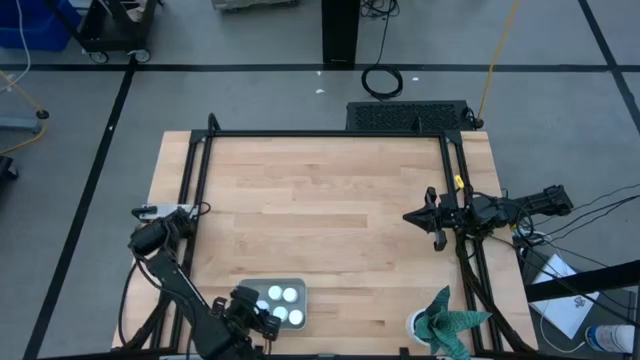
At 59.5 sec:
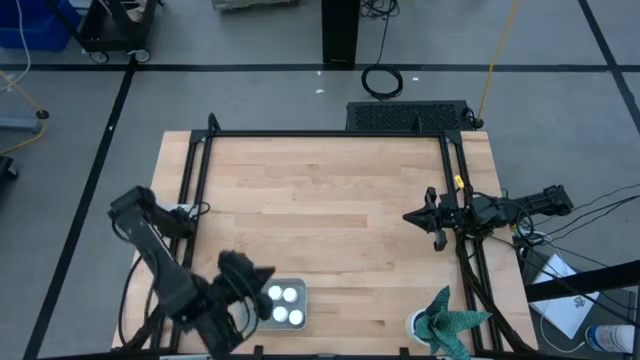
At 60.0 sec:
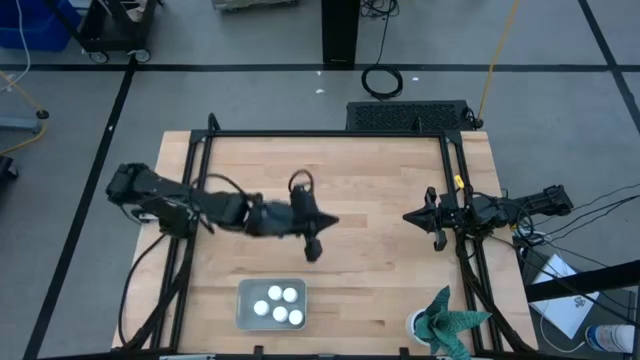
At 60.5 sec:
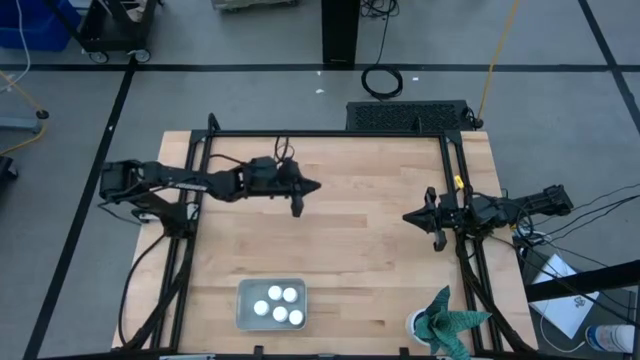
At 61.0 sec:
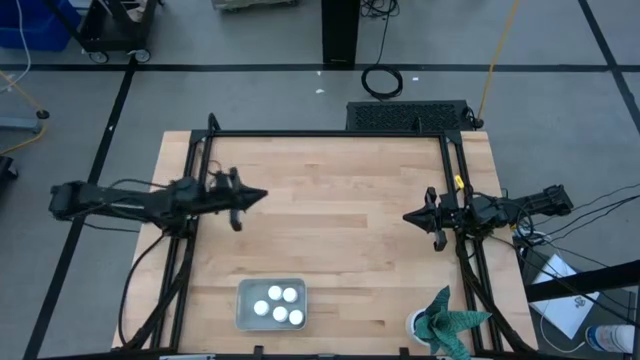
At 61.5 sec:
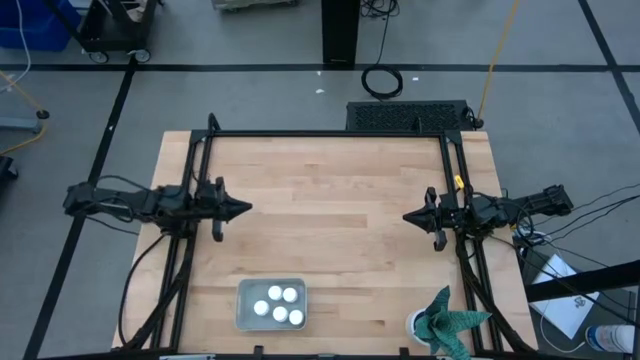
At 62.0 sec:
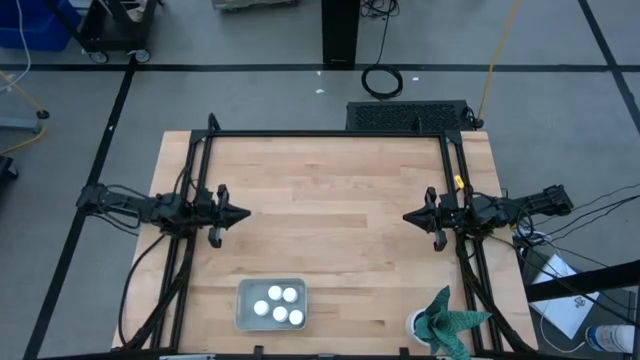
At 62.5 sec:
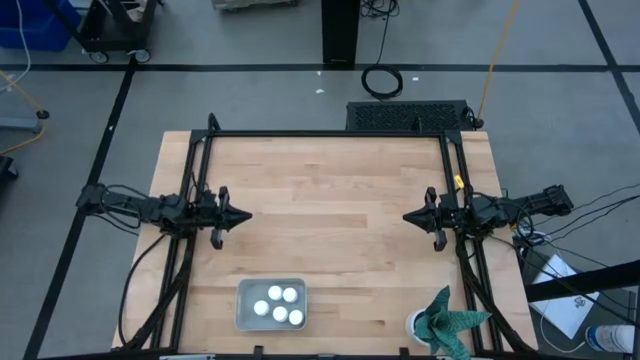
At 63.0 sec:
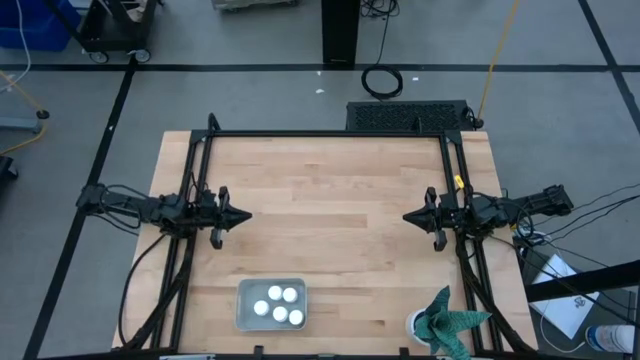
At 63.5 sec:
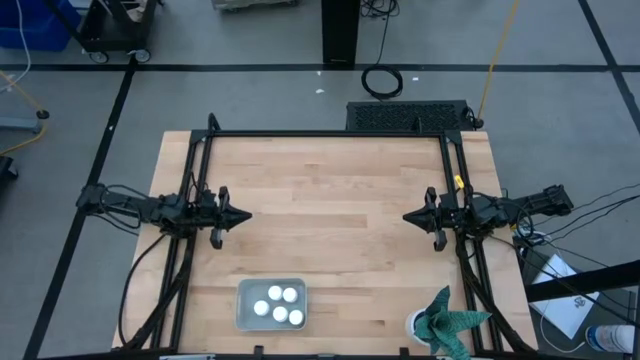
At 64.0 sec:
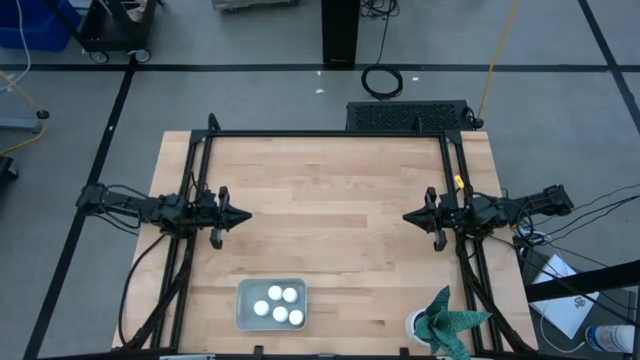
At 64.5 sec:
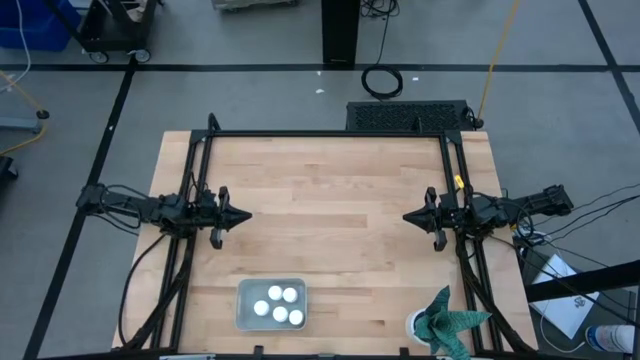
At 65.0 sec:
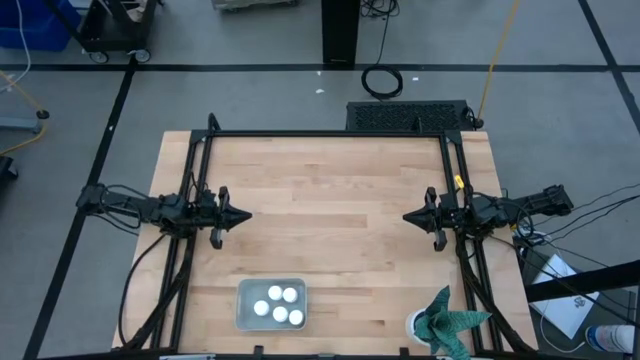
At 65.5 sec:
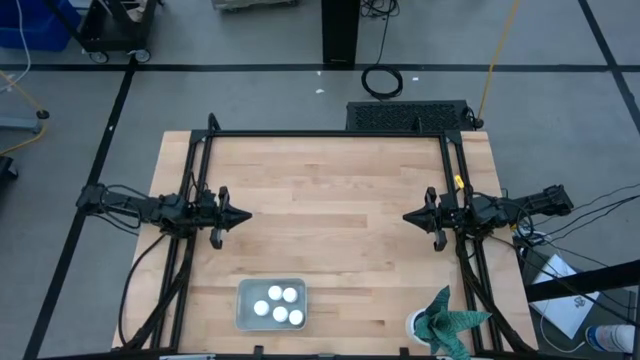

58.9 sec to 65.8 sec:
Task: Pick and place pill bottles into a basket
Return to Home Position

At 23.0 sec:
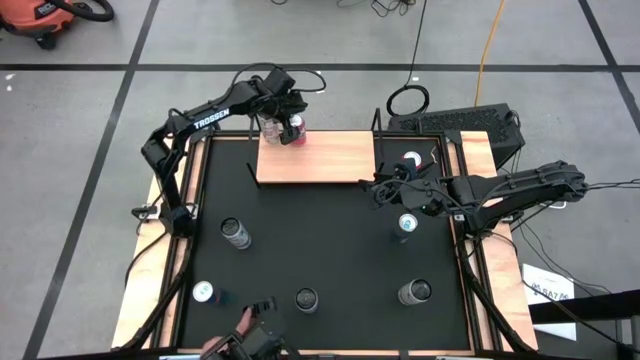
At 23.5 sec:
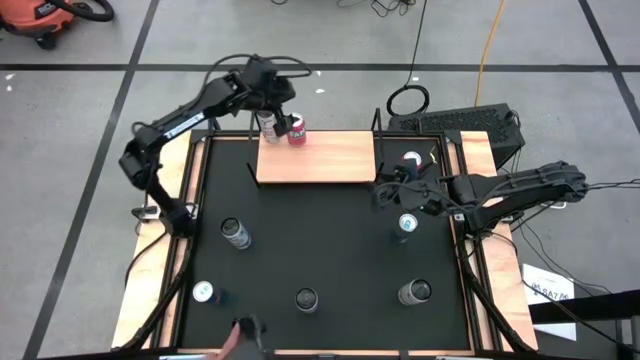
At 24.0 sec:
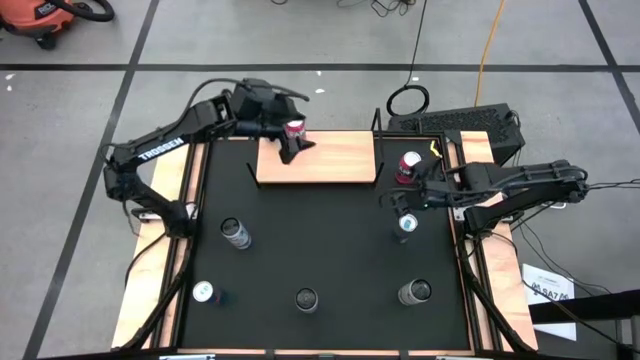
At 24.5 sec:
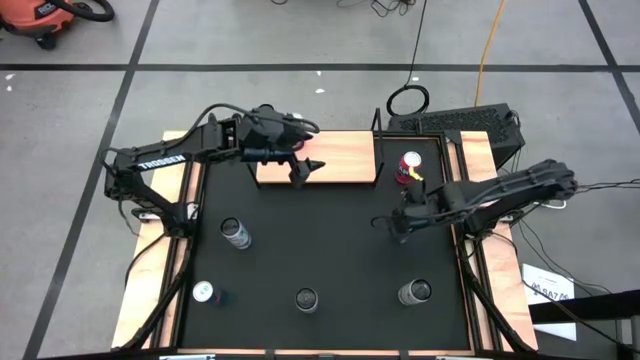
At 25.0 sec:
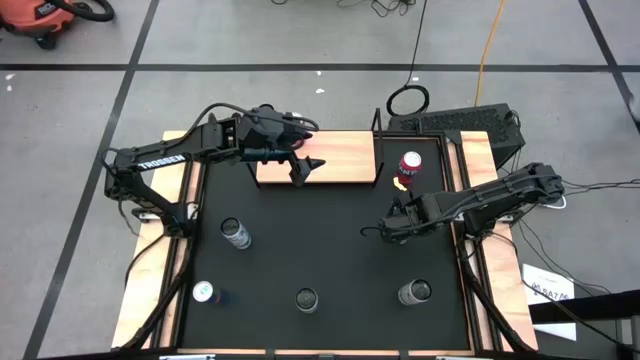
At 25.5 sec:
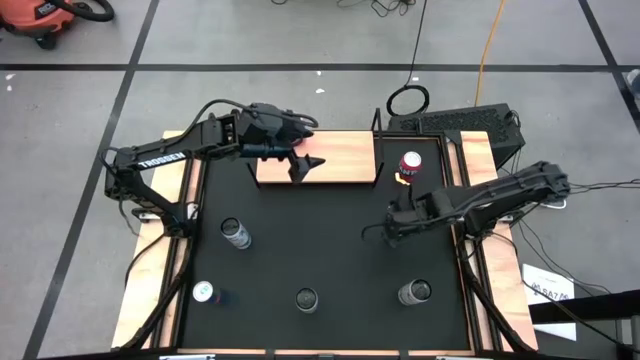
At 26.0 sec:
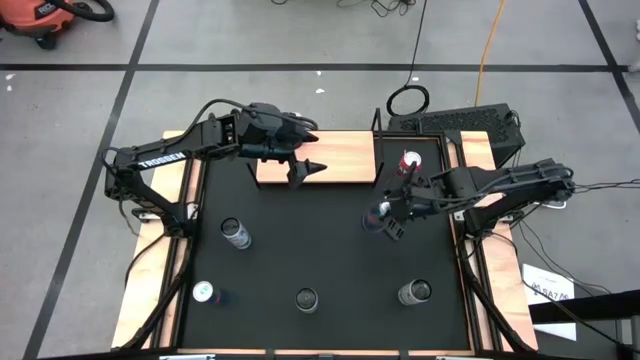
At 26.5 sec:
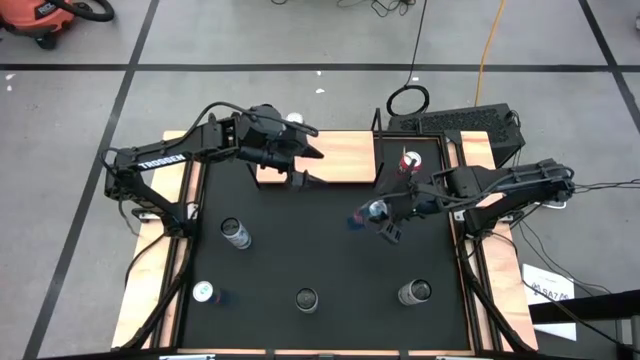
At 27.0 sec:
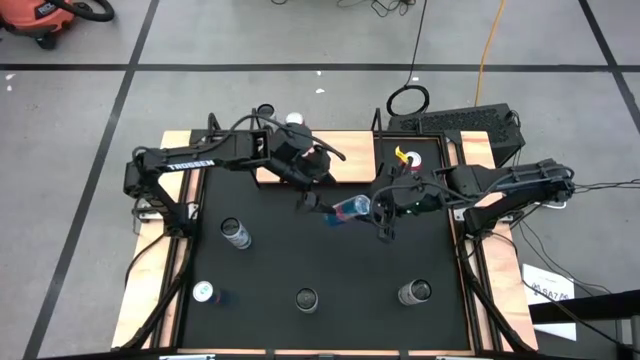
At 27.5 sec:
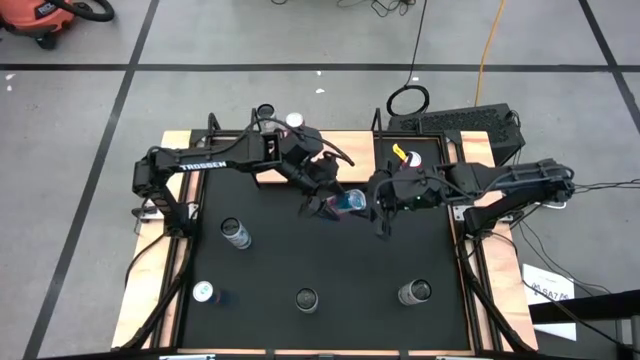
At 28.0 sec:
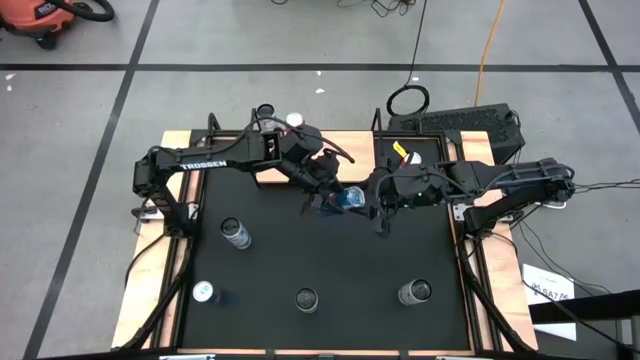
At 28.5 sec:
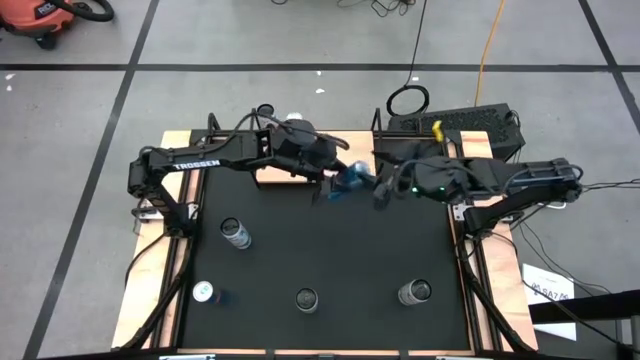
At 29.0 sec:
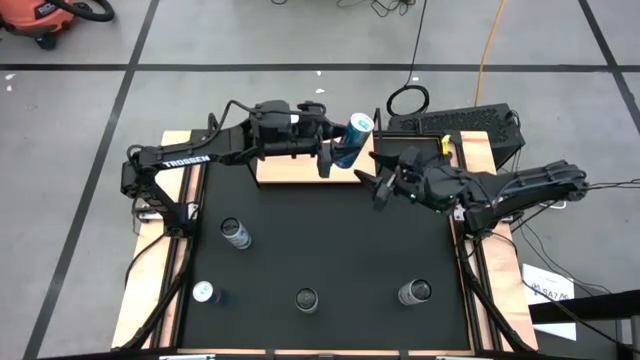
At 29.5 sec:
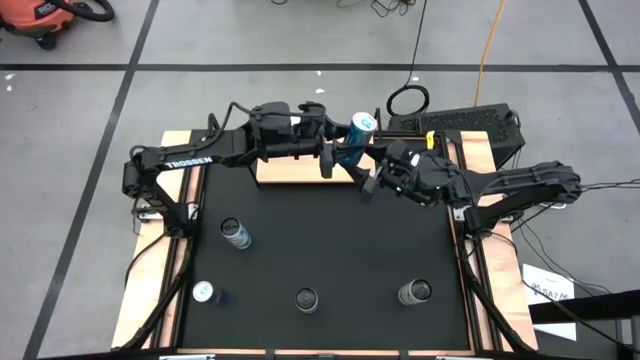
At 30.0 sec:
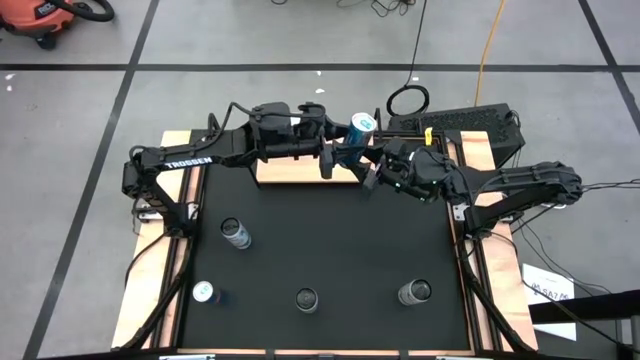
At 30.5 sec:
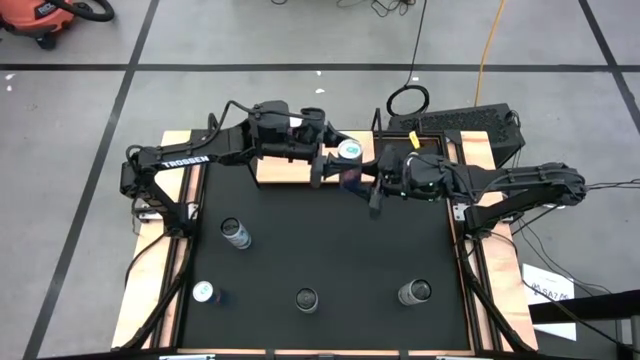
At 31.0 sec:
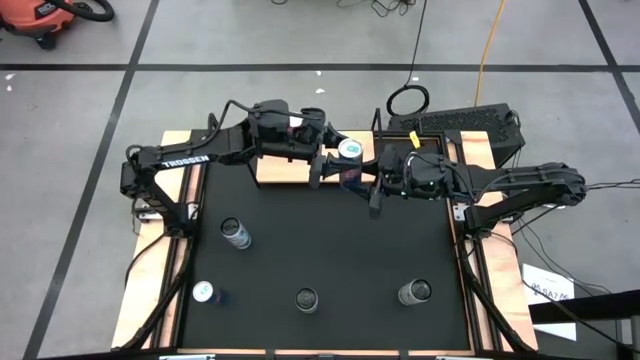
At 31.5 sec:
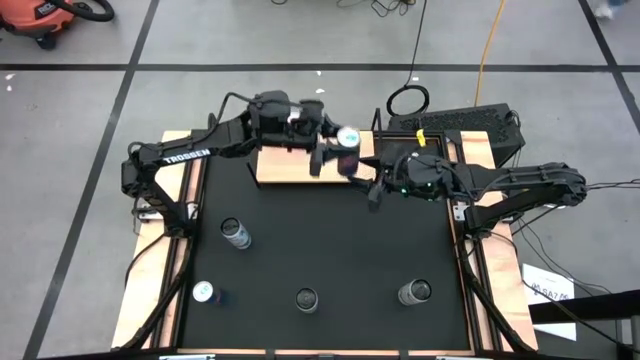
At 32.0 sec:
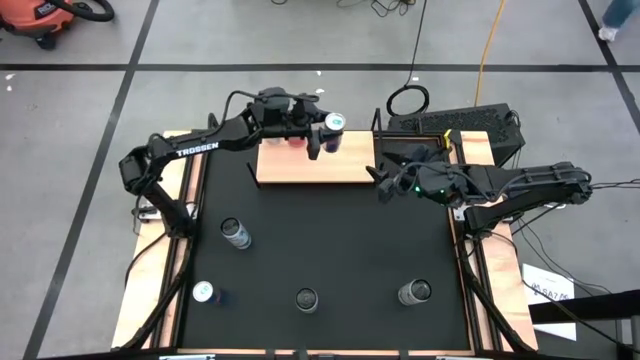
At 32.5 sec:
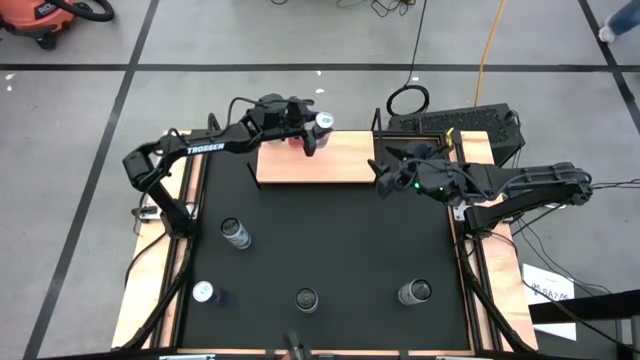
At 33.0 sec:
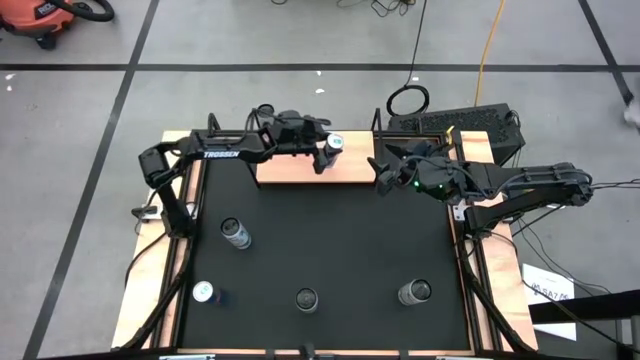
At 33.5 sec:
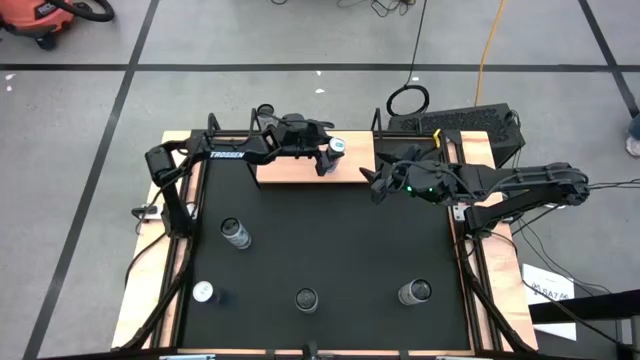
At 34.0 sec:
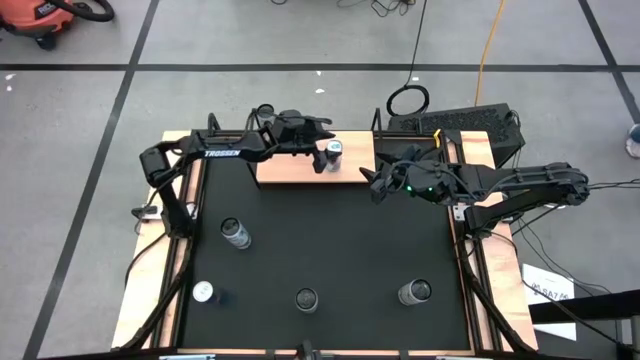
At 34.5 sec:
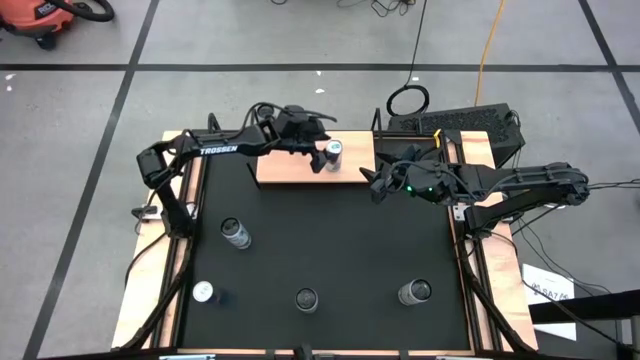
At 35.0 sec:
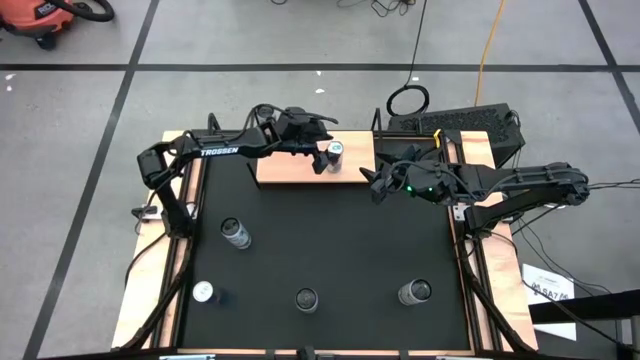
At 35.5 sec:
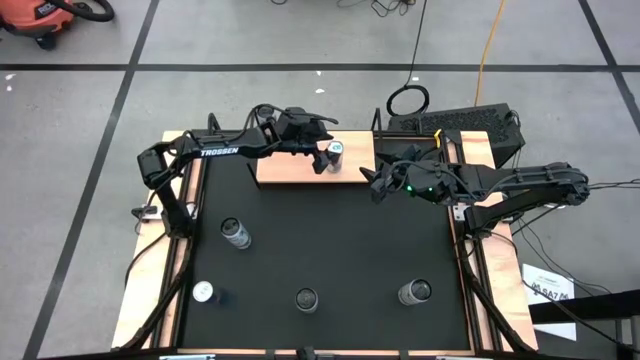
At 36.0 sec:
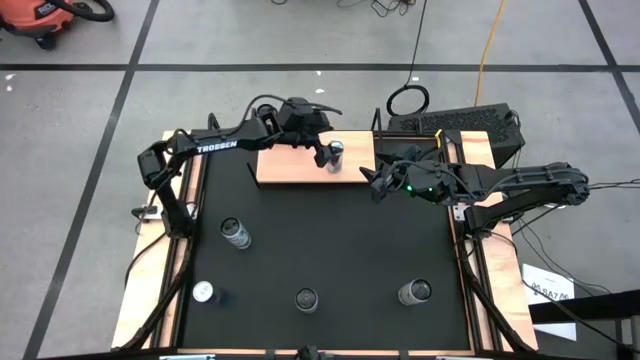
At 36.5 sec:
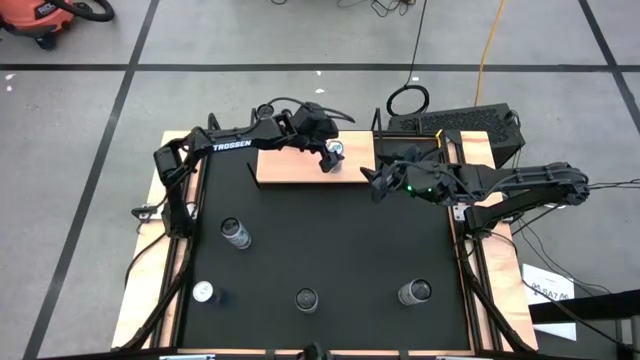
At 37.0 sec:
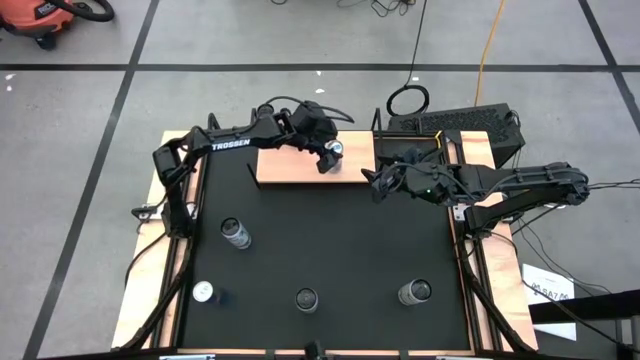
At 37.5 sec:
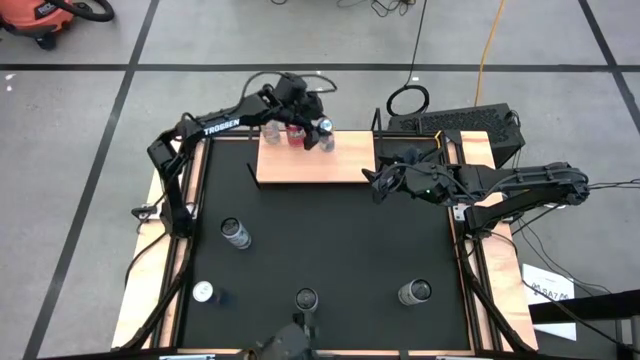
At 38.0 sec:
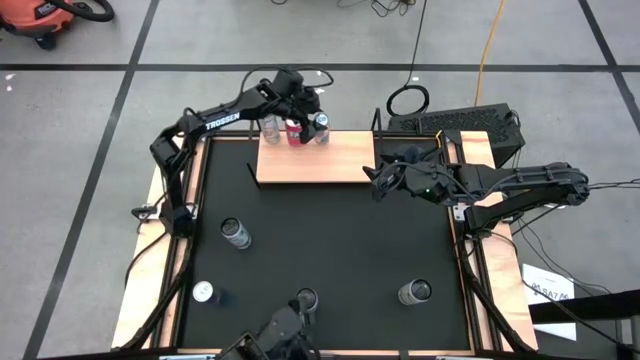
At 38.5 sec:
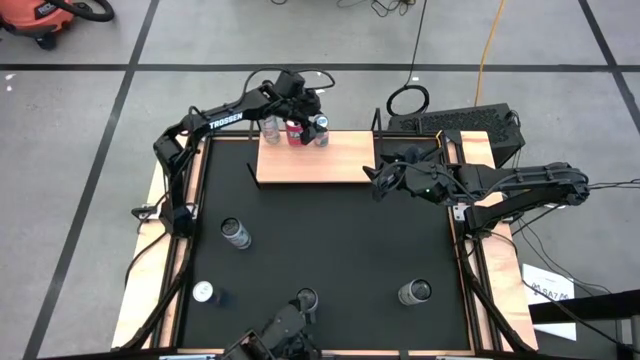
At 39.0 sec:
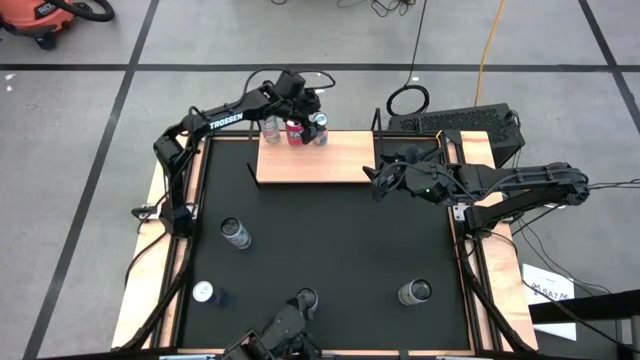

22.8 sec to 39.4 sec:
Task: Place canned beverage on shelf
Put the right blue soda can on the shelf
